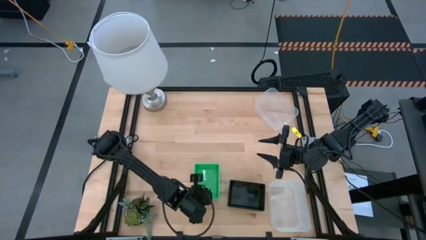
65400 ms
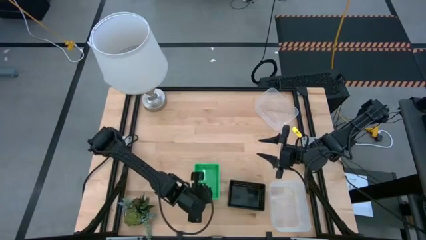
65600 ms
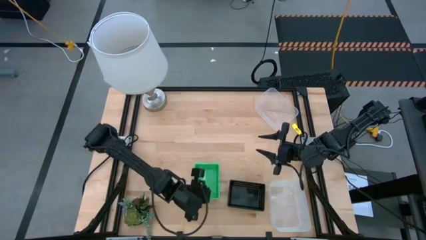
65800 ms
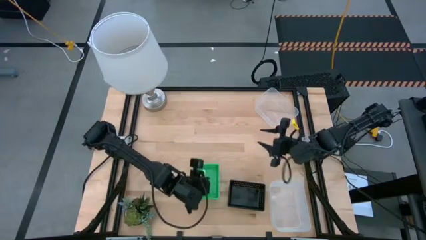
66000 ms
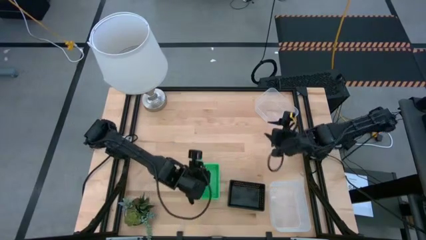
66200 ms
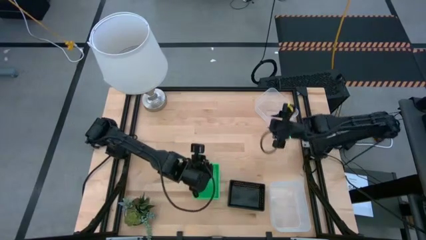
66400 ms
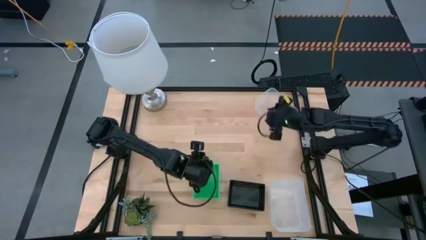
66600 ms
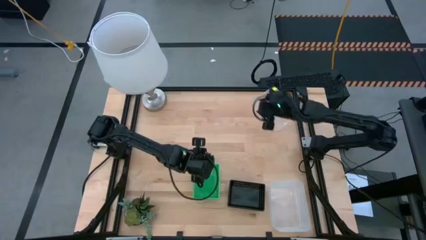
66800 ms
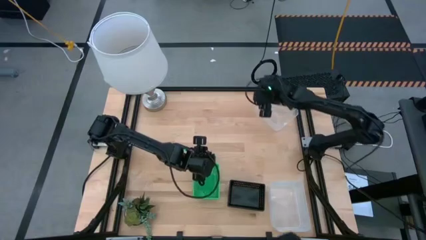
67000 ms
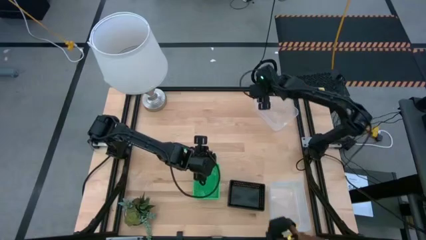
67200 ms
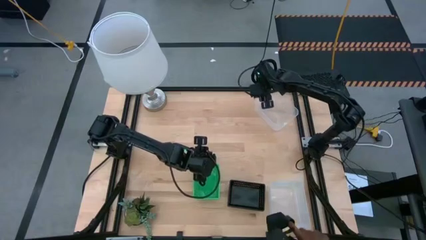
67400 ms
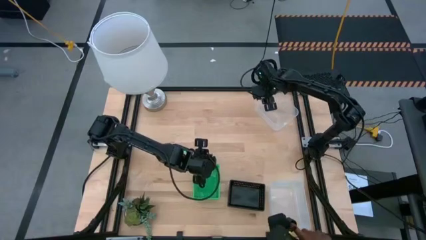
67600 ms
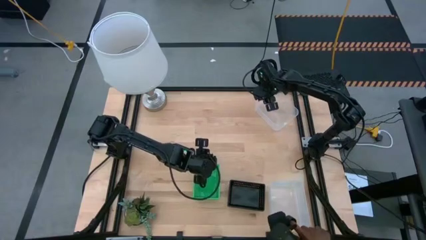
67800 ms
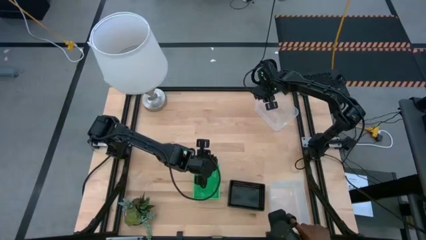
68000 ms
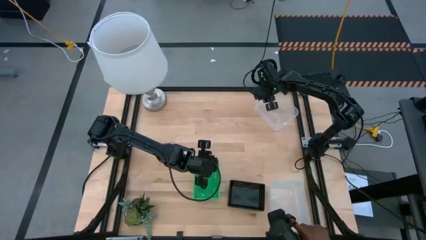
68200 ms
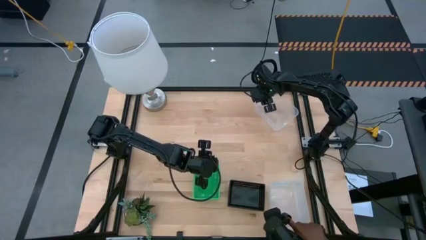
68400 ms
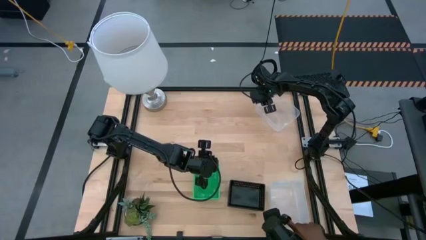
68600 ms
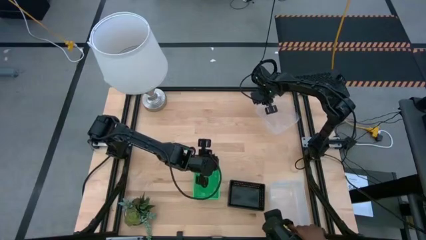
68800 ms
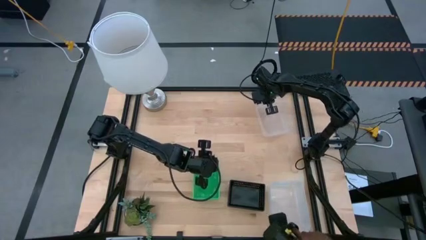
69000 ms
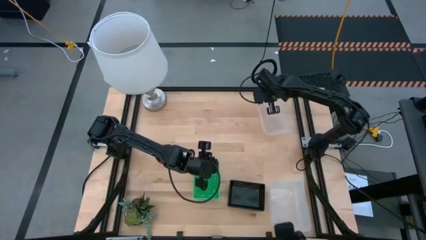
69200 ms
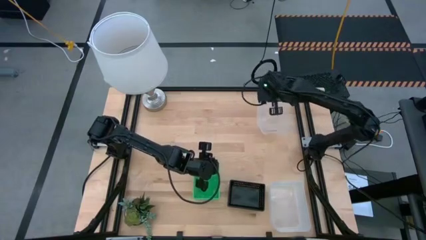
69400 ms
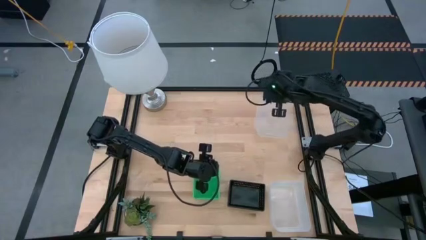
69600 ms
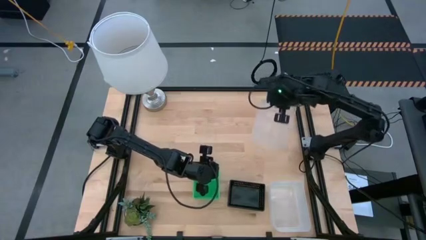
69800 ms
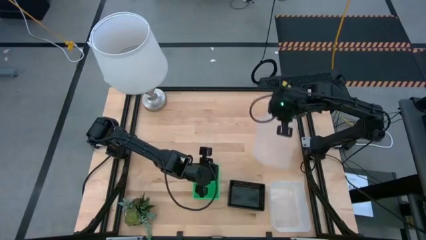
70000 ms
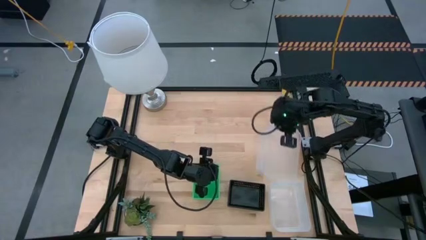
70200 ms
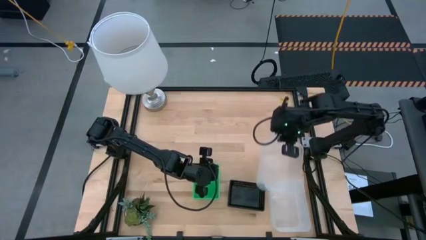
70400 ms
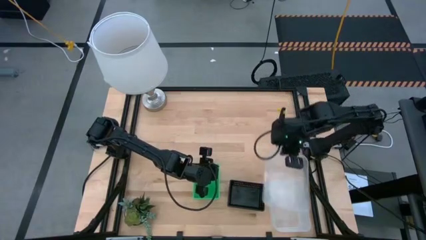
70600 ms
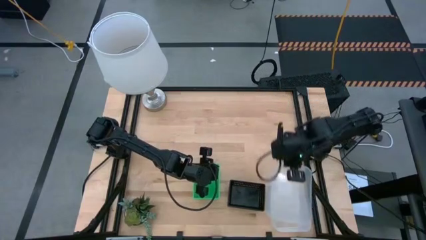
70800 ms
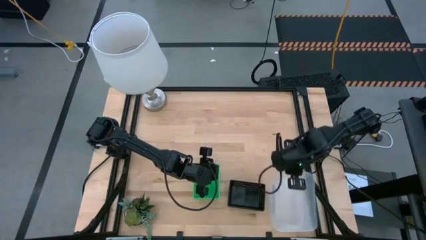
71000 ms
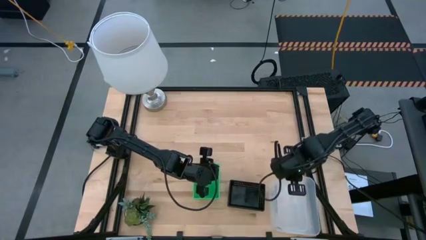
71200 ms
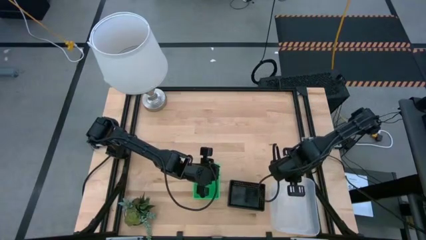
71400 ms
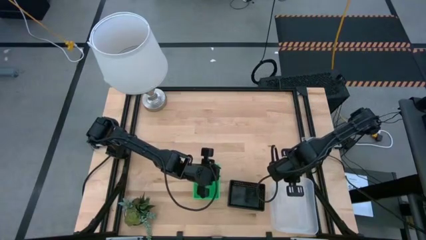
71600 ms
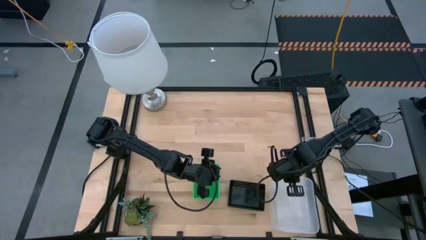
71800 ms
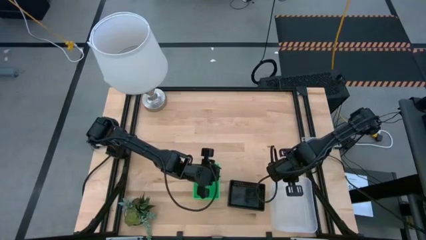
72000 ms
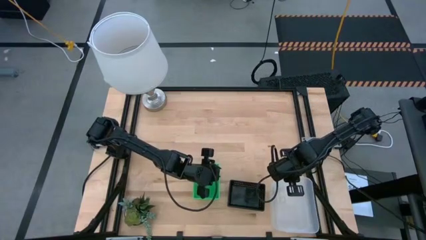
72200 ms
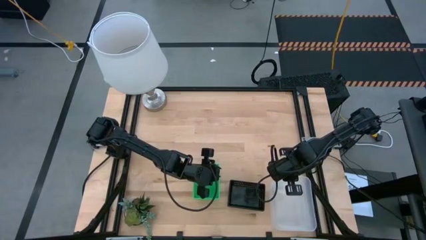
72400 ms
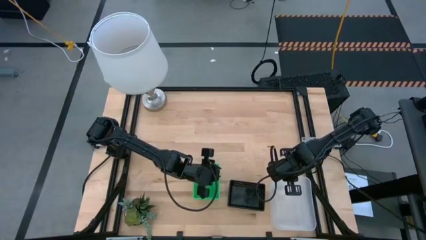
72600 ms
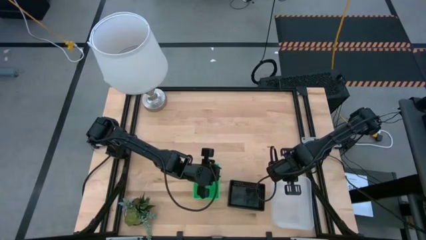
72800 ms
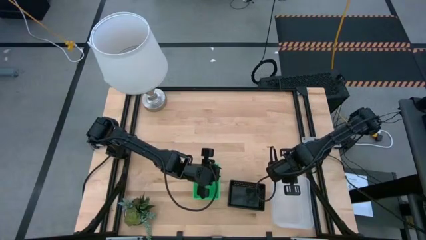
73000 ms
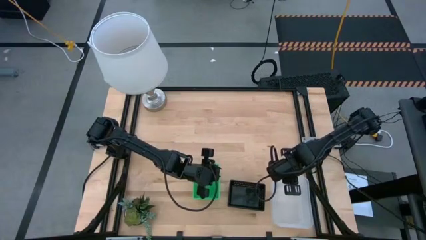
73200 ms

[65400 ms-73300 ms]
Stack the top transparent bin on top of the bottom stacked transparent bins

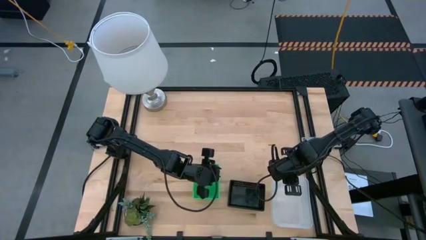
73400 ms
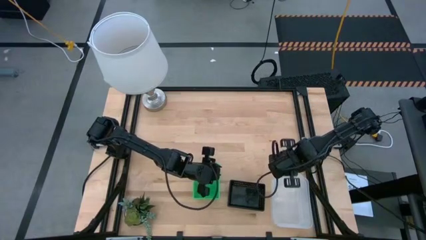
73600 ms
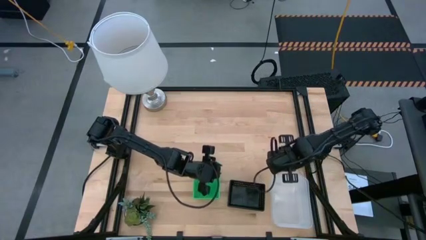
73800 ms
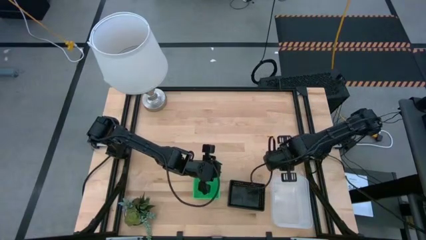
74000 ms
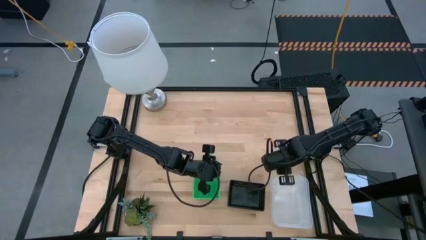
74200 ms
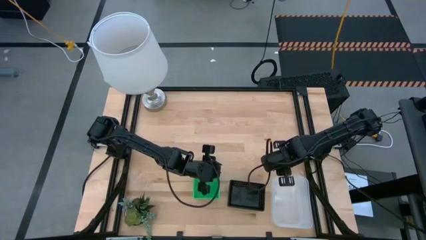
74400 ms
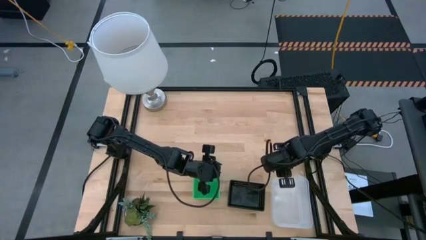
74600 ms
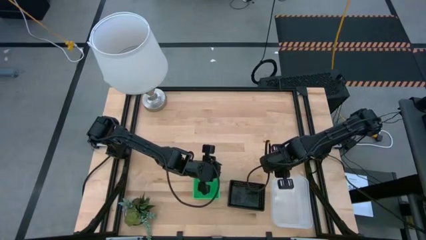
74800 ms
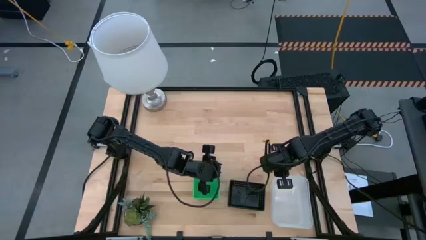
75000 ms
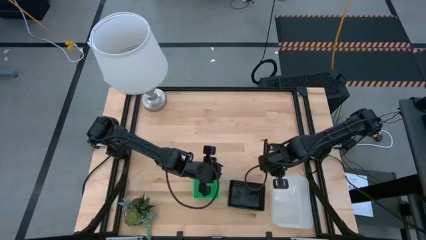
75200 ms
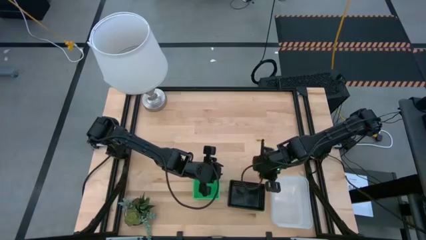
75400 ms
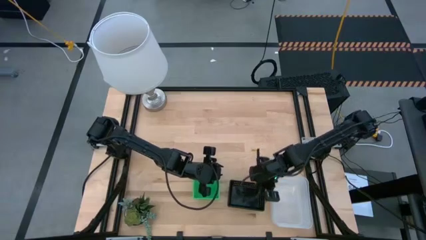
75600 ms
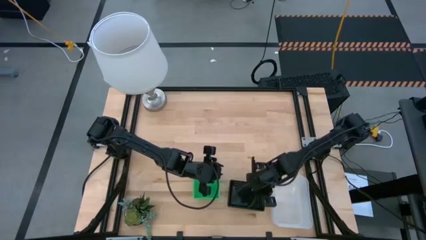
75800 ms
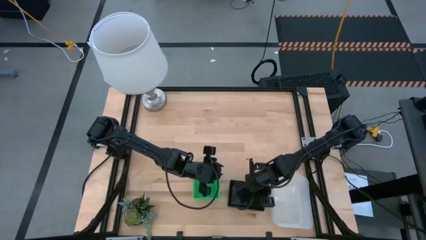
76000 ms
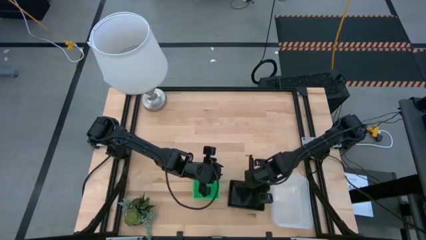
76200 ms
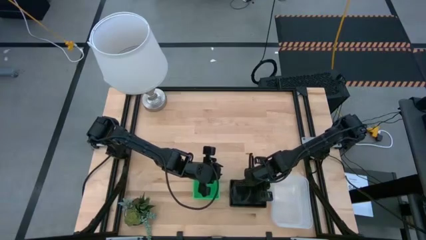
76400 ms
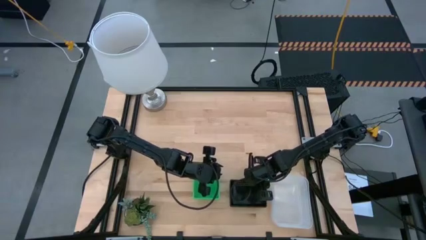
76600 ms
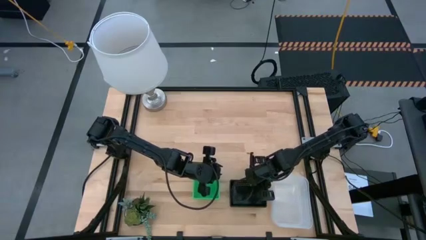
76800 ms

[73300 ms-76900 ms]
Adjust the stacked black bins
